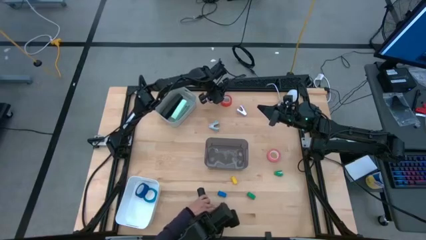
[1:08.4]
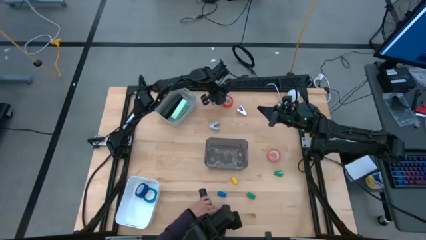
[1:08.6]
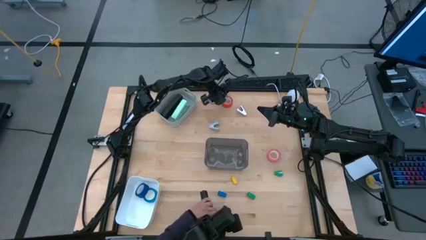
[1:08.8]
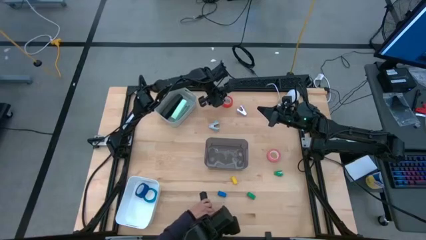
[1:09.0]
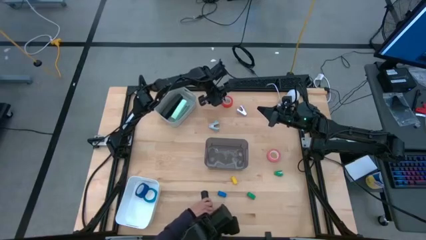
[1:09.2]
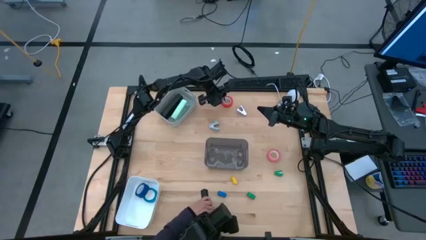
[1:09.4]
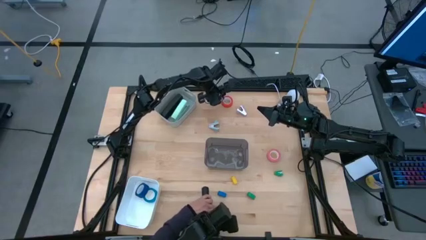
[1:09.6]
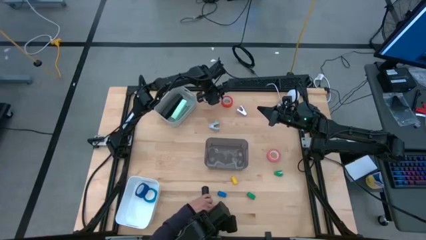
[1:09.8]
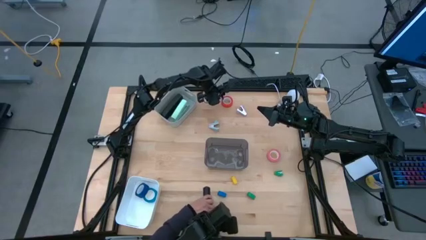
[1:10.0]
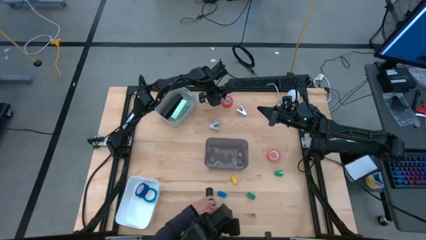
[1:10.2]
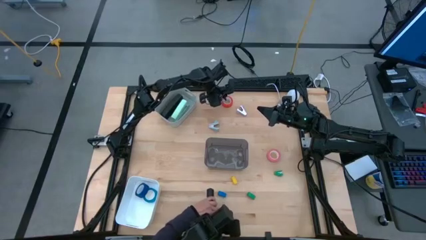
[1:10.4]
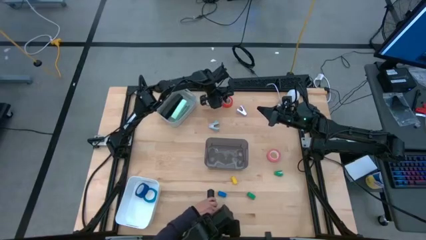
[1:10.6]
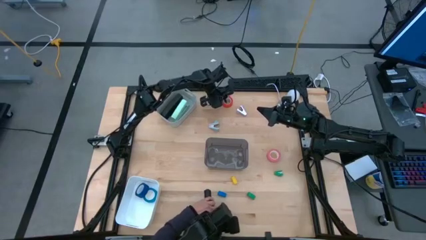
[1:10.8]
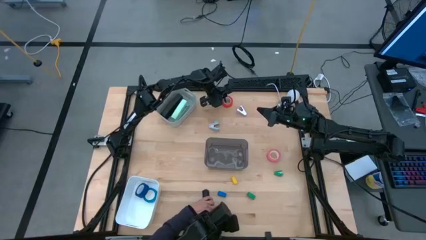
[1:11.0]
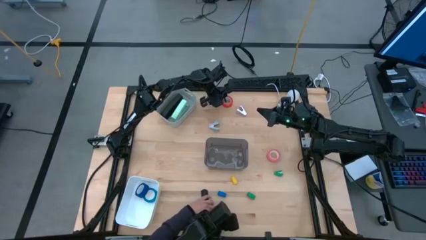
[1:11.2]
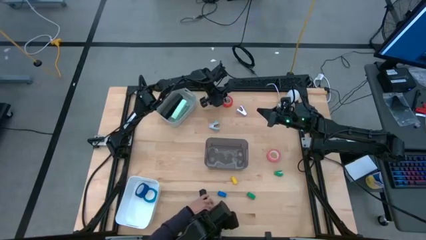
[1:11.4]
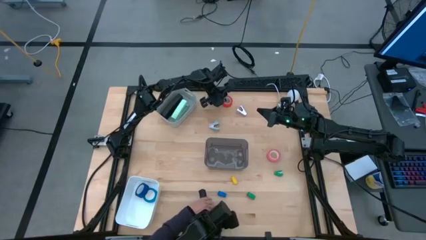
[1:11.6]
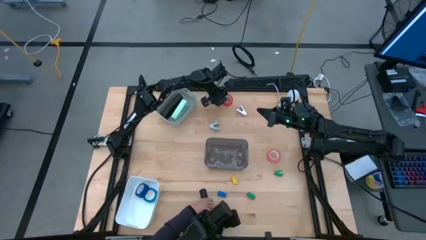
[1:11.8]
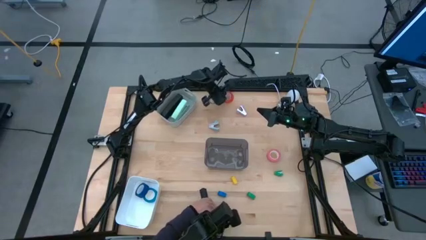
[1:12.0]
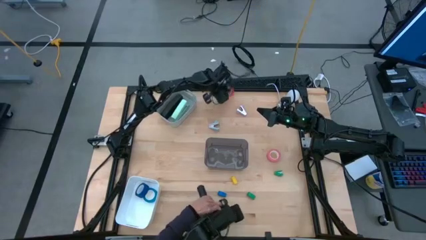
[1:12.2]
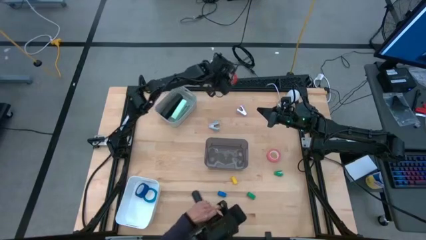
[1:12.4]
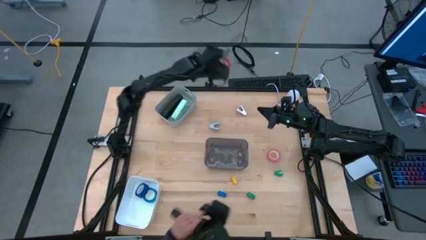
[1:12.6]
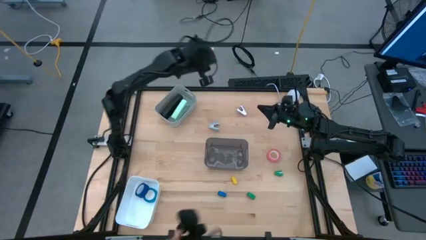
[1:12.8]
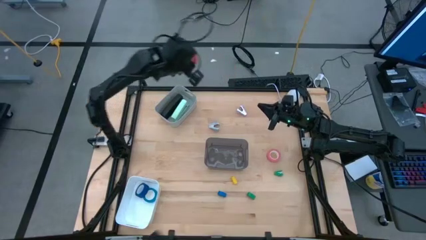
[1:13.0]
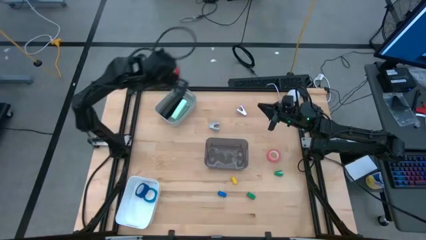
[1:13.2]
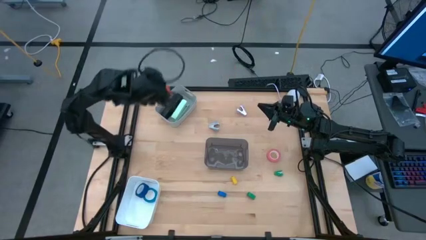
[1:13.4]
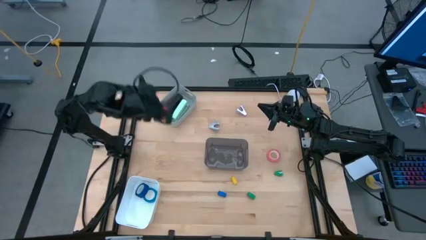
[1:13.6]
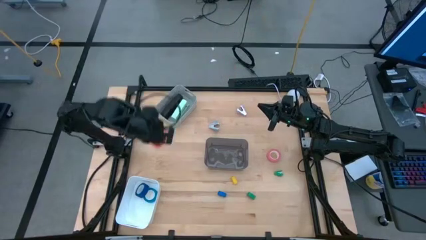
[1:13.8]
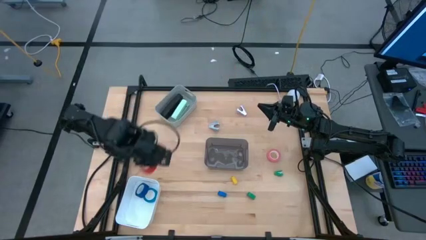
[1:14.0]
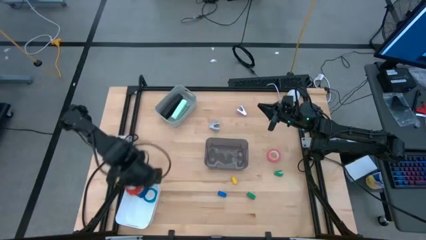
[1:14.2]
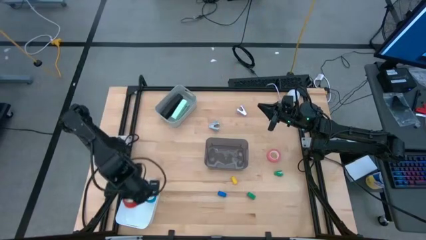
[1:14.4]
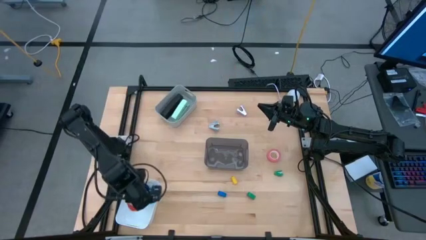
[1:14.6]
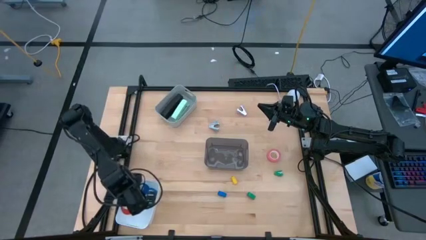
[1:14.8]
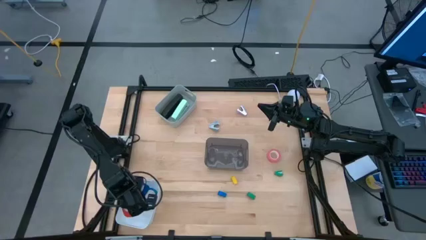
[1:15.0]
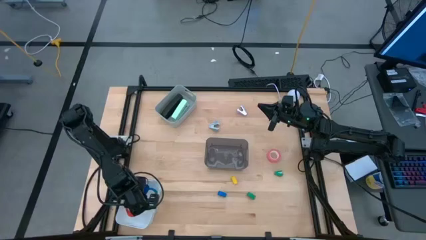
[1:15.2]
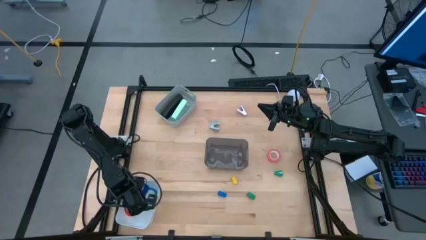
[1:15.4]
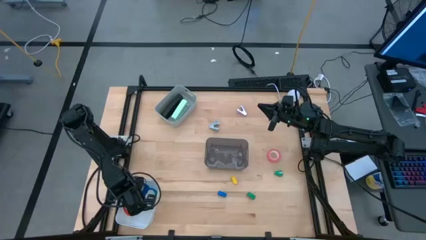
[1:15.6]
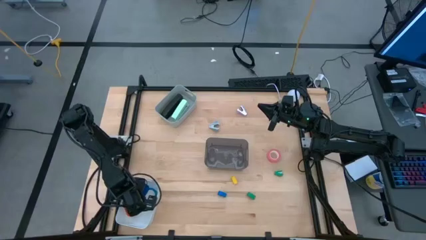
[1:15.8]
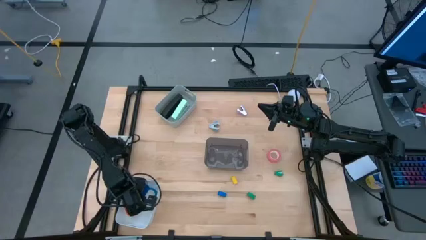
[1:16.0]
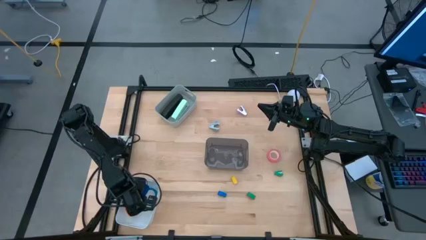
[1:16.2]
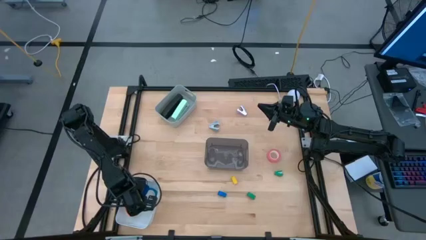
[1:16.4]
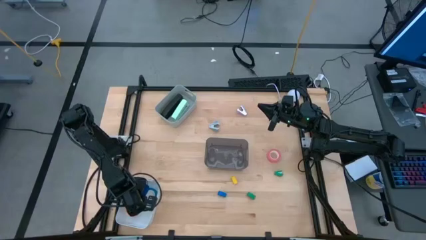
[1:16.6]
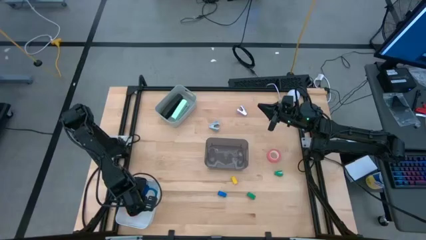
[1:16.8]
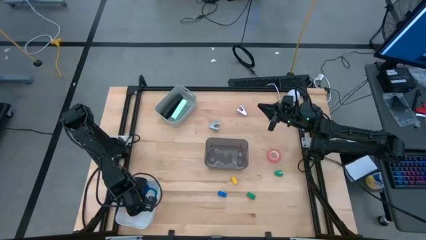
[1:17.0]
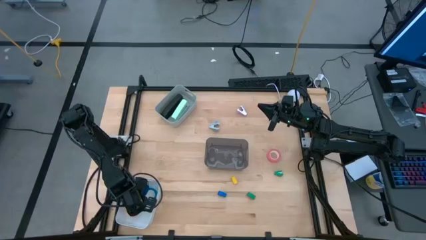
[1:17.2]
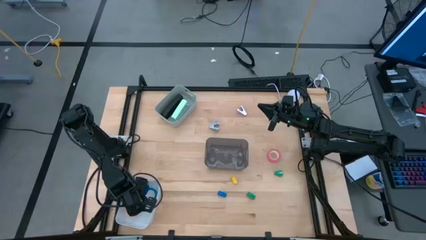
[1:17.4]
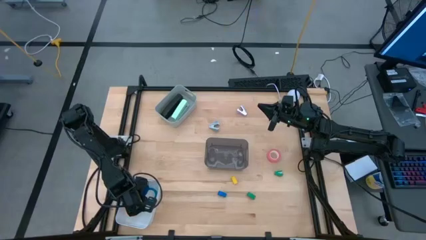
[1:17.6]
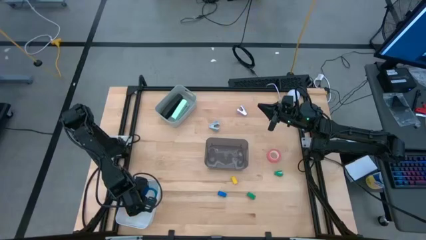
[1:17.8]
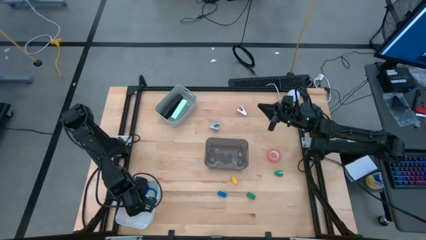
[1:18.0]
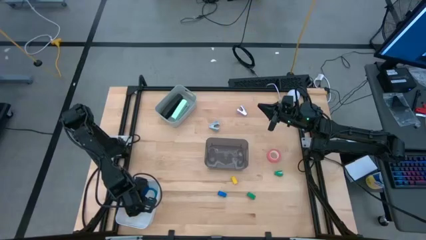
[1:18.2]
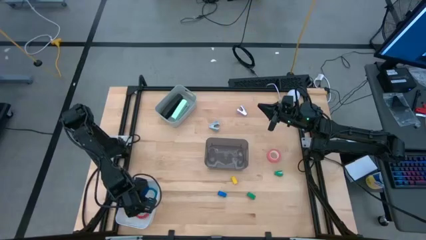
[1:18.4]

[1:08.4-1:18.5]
Task: Pick and place Stapler, Stapler remover, tape
Put the orange tape into the white bin

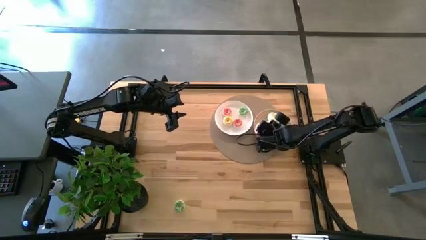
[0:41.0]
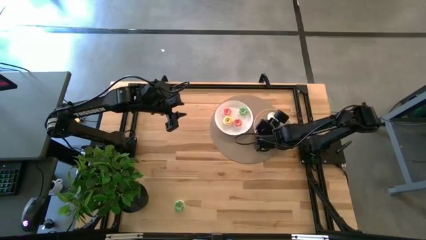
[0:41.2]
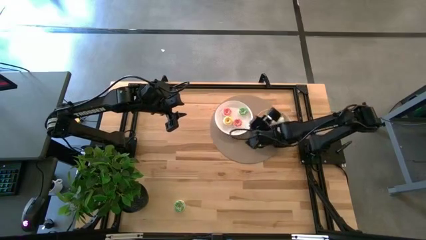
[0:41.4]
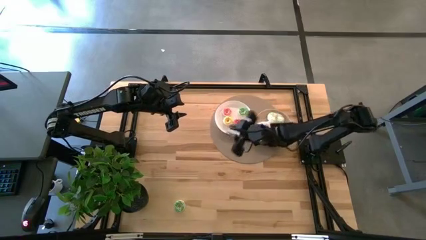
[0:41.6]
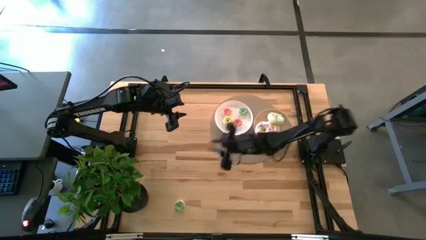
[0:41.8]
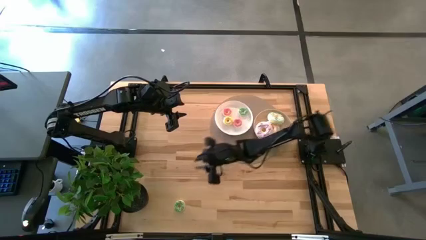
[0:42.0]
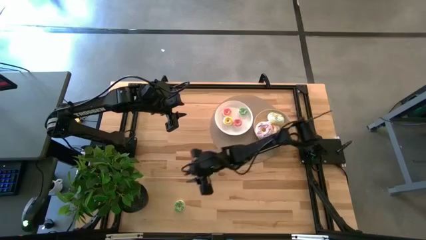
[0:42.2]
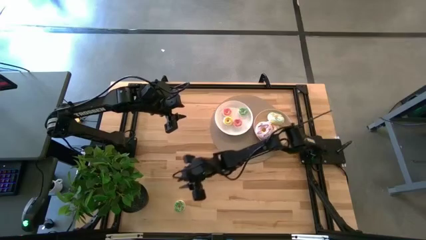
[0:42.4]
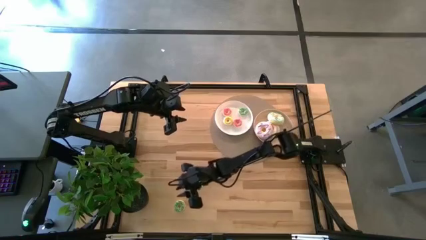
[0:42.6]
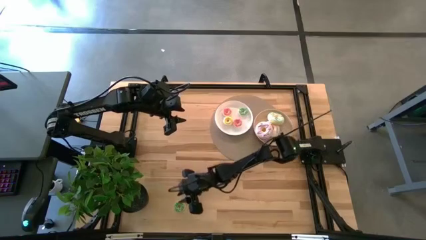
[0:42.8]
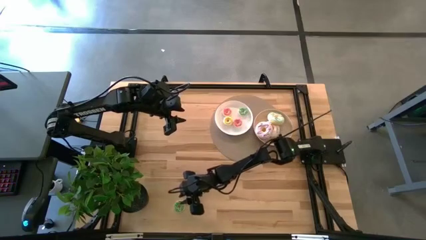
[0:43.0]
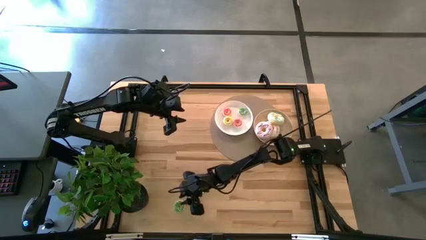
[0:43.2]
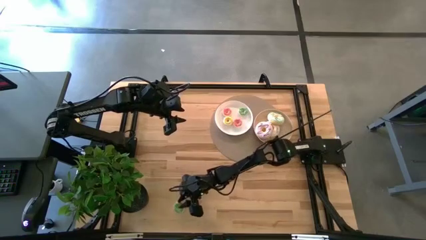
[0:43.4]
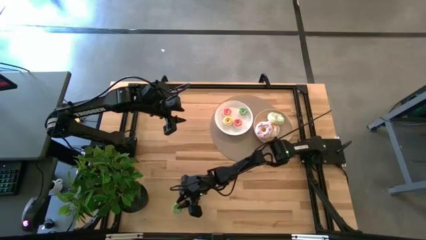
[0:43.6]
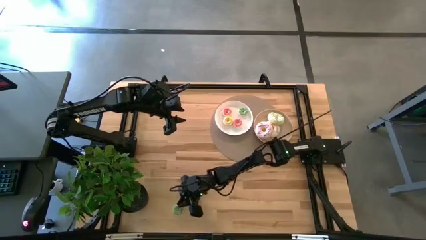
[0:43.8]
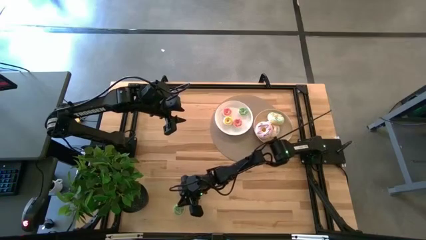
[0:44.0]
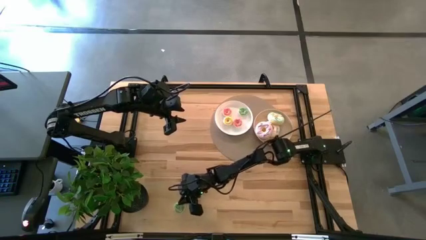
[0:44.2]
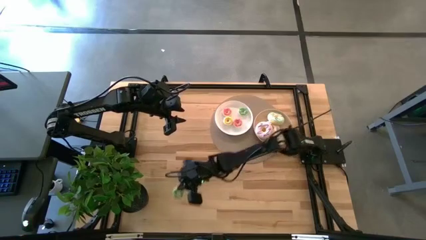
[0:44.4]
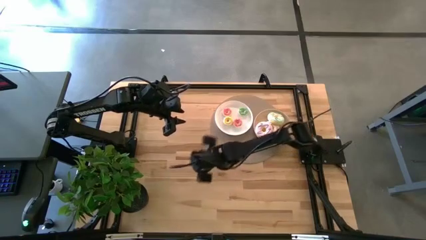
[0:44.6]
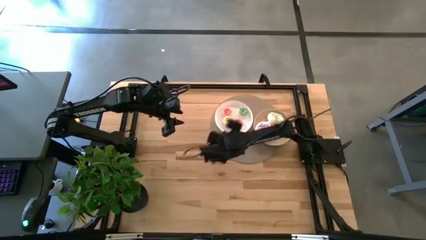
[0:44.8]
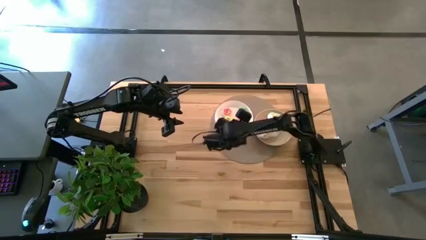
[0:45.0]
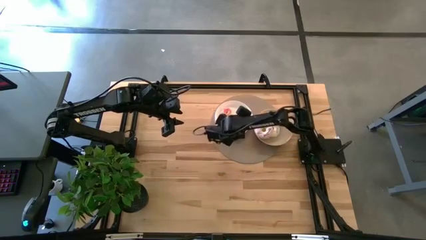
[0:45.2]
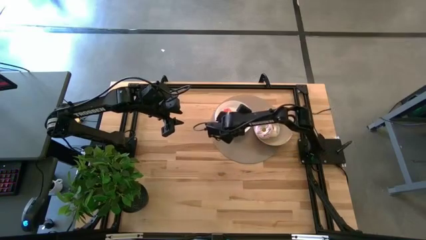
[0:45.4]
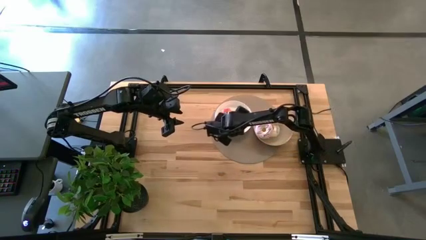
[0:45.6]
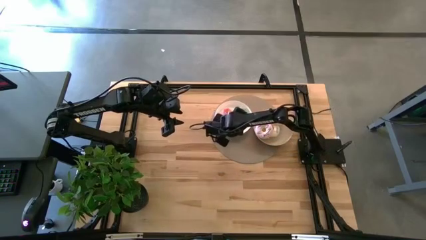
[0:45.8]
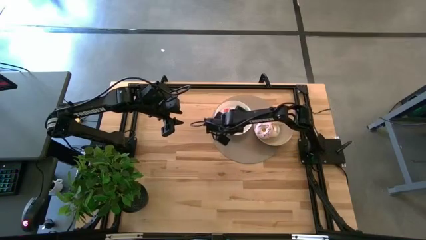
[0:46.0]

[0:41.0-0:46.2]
Task: Pick & Place donuts
Put the small green donut on the brown plate
